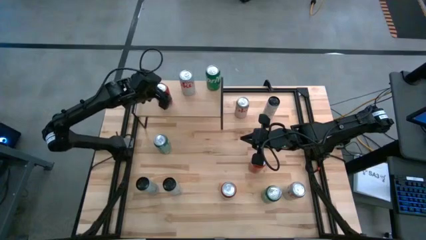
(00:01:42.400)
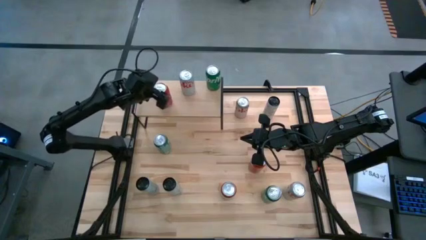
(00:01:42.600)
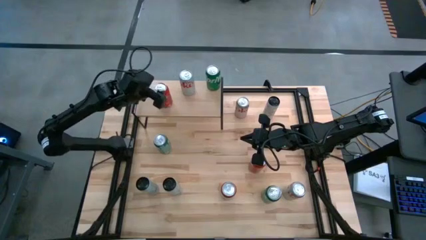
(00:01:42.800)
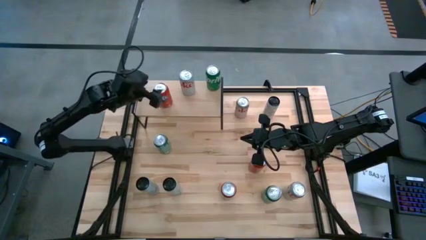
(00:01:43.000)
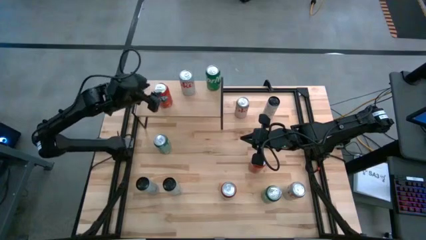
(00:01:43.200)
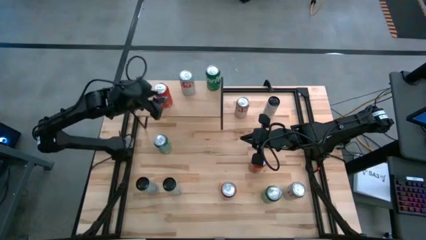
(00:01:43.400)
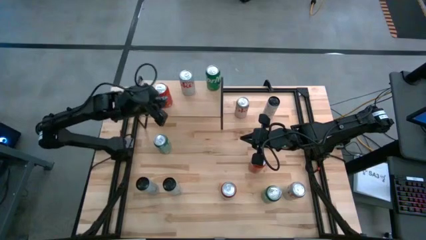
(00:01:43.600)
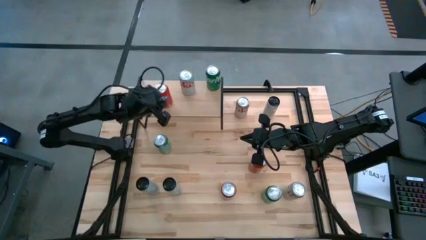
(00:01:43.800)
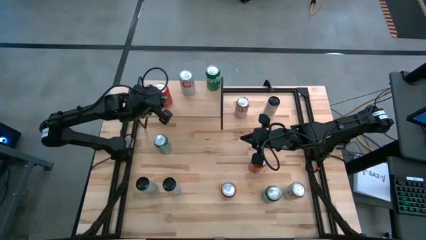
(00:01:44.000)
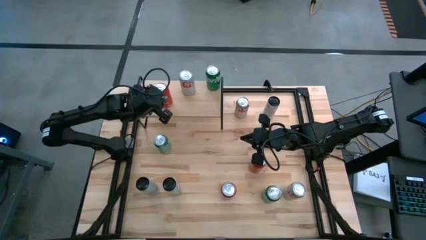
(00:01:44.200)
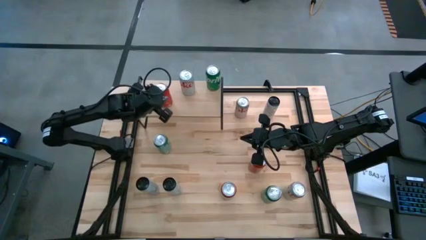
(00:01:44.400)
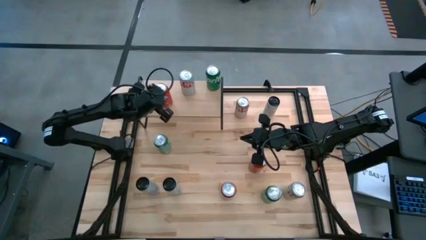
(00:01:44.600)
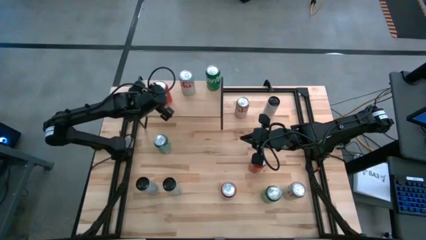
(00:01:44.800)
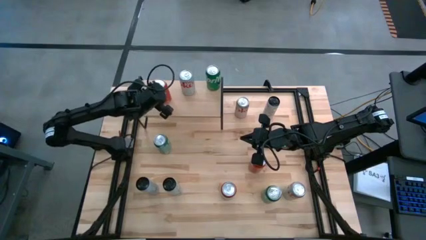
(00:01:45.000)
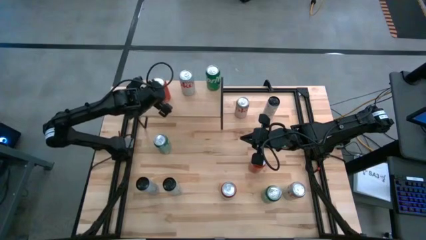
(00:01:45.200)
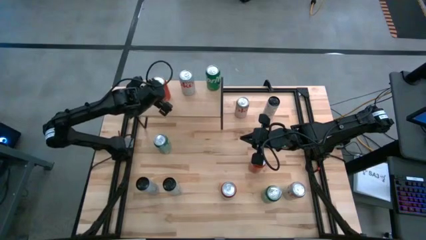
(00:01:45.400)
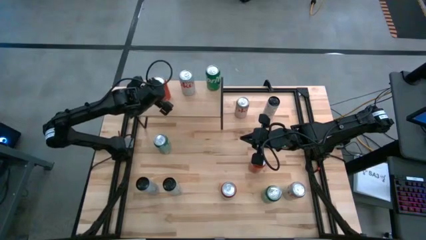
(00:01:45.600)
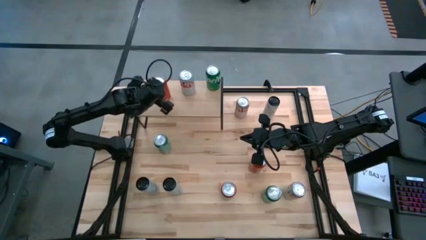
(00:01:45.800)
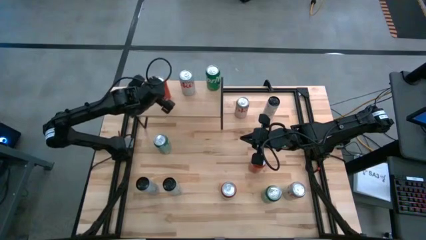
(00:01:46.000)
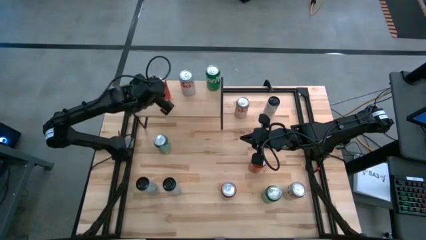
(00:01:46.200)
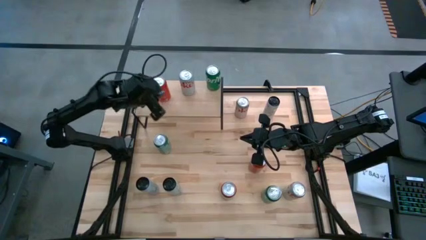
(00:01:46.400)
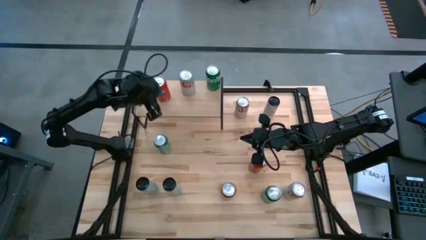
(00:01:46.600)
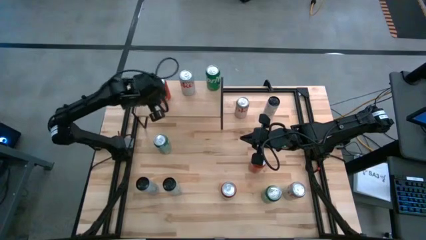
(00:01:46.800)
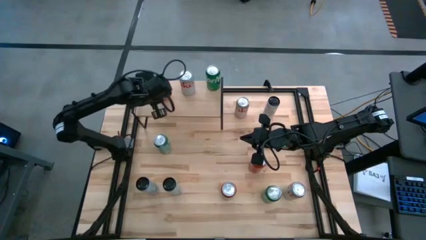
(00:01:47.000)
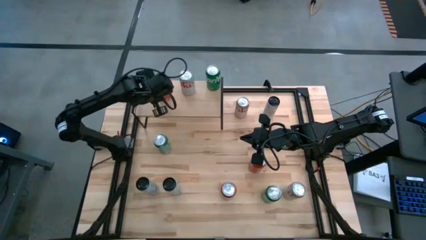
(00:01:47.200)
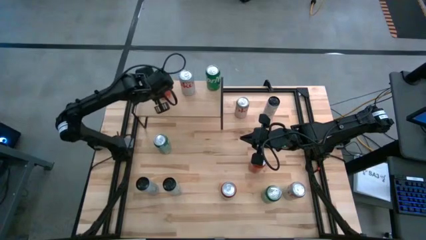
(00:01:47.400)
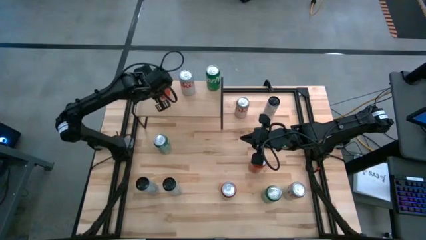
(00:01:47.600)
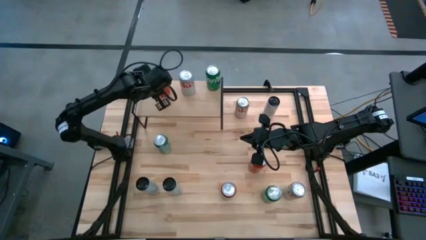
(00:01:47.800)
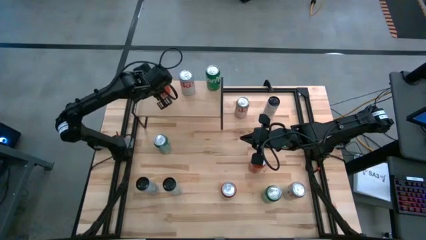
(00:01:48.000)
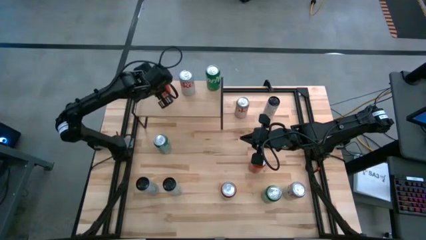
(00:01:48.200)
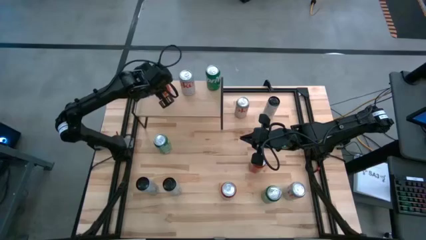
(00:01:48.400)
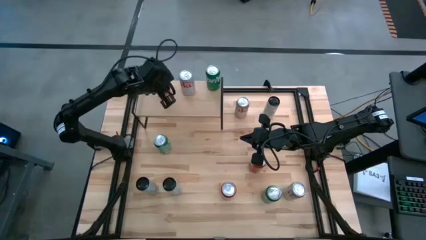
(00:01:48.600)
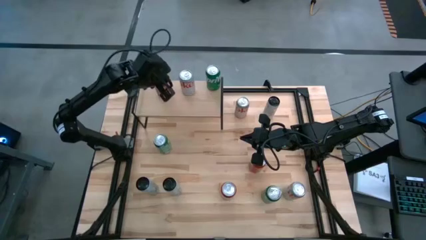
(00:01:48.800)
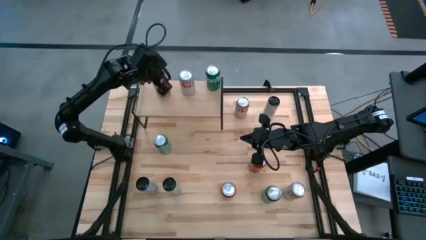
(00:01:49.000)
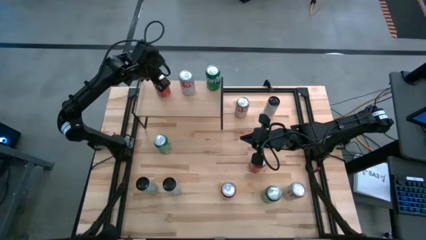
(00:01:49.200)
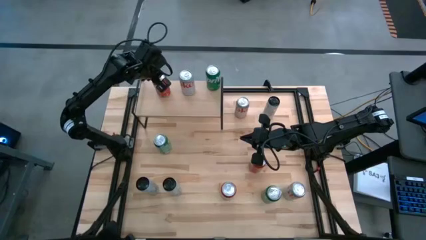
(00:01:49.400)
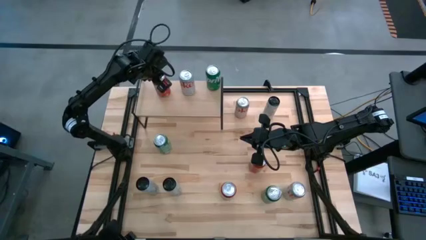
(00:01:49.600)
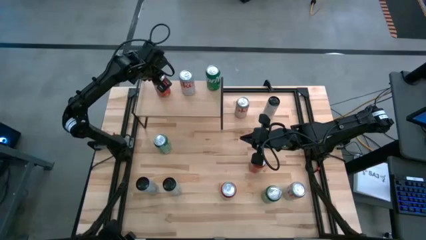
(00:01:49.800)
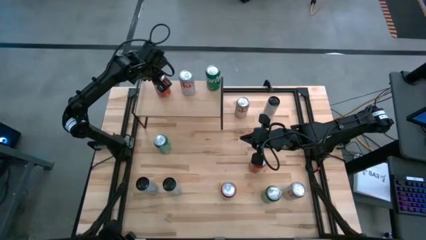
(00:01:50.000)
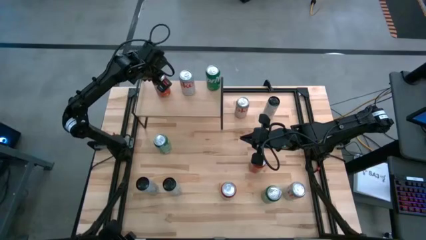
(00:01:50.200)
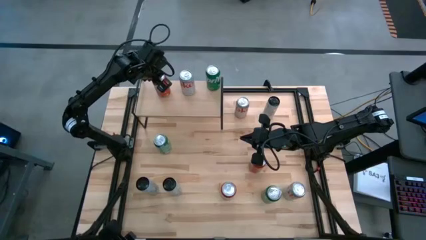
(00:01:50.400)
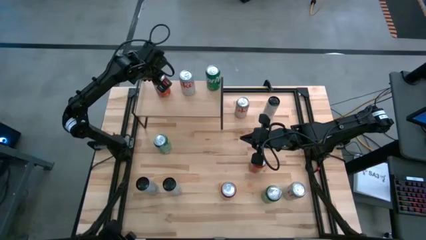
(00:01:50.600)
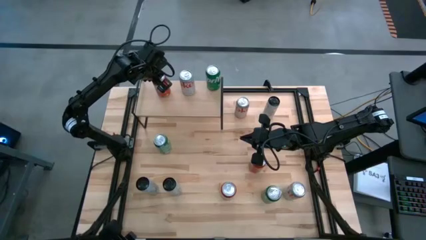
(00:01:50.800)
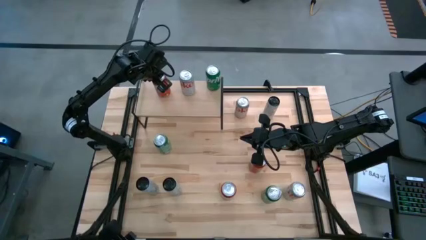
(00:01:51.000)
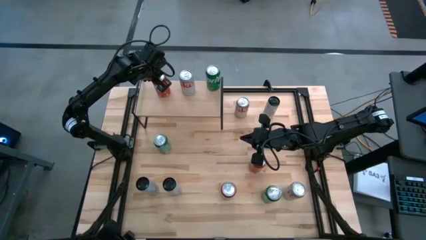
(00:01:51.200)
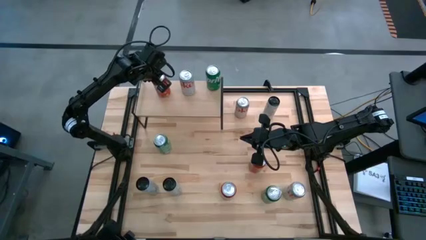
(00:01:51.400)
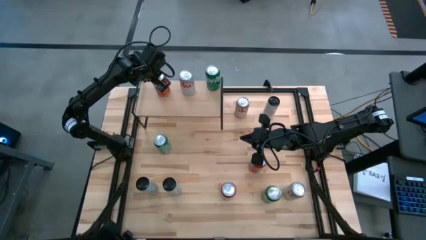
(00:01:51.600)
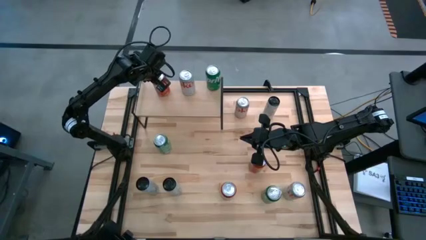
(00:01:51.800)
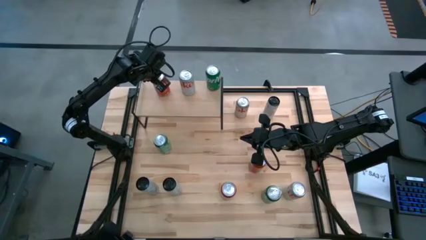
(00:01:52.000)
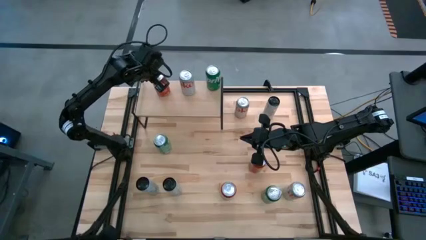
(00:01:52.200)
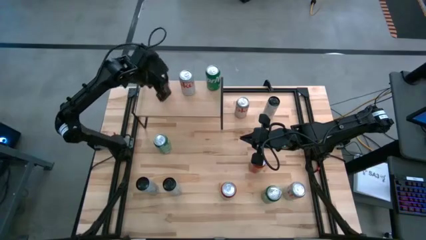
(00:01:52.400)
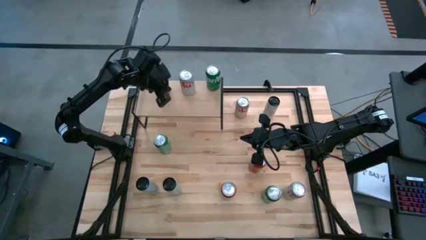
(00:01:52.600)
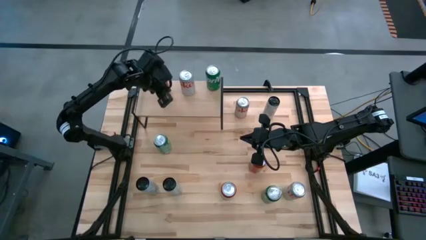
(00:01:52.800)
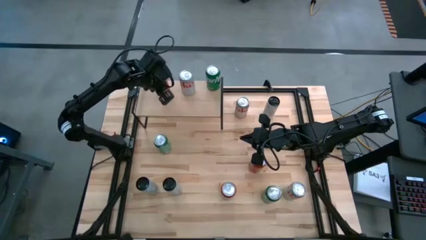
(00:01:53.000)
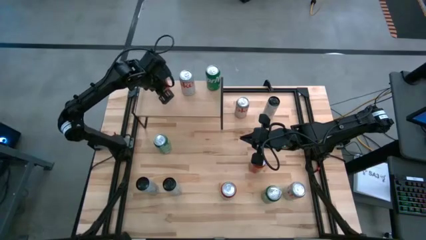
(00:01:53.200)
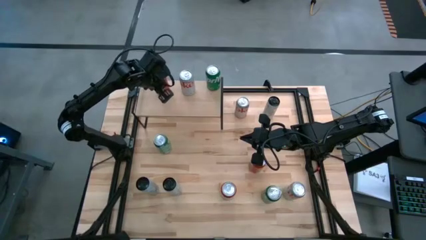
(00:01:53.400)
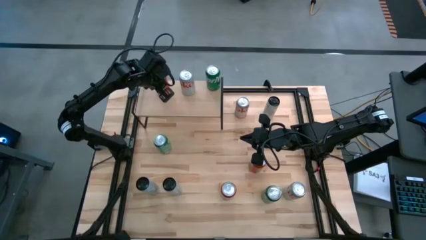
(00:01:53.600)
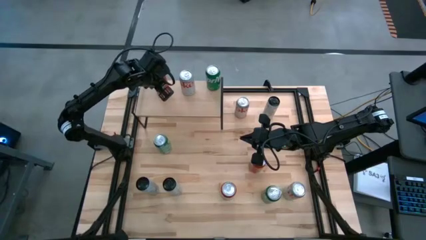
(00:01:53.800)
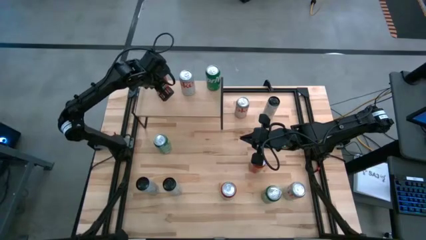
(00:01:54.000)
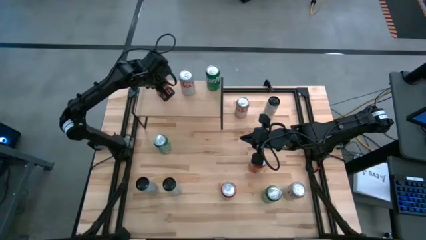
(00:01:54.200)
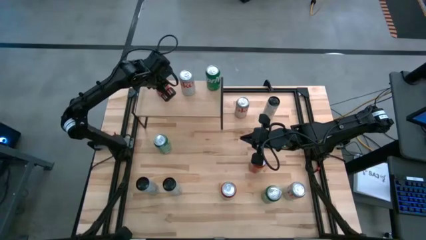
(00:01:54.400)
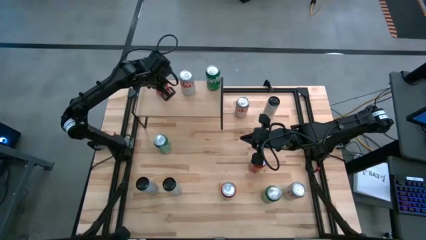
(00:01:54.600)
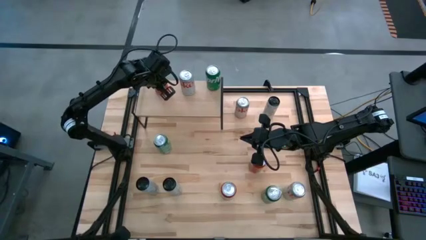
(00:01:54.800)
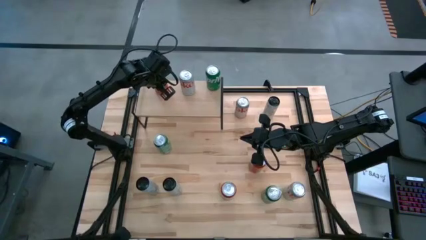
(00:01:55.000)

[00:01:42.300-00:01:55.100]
Task: Place canned beverage on shelf
Put the top left red soda can on the shelf

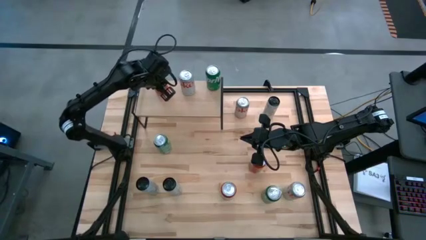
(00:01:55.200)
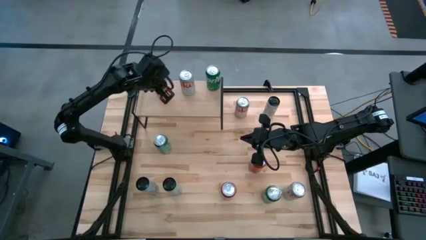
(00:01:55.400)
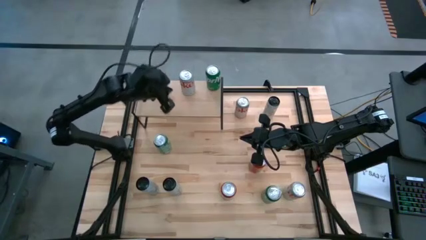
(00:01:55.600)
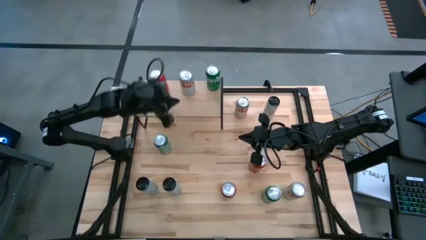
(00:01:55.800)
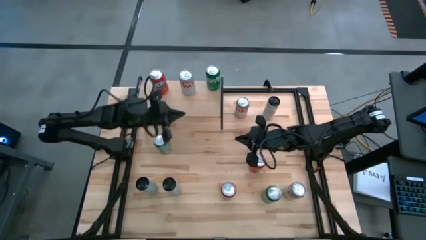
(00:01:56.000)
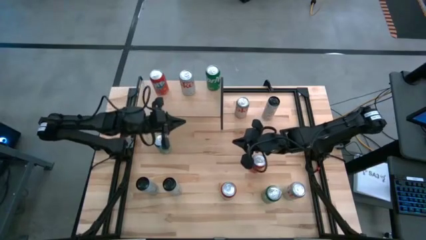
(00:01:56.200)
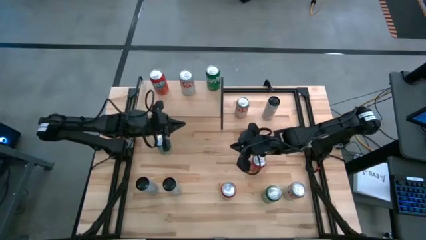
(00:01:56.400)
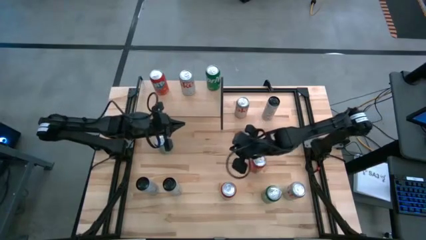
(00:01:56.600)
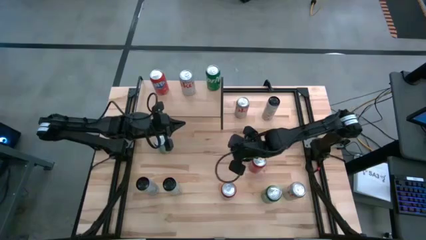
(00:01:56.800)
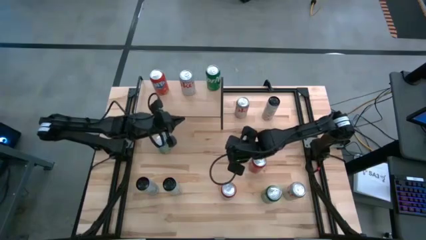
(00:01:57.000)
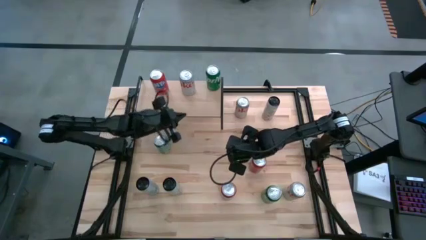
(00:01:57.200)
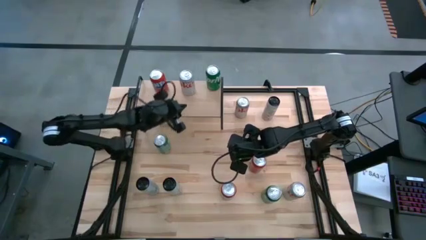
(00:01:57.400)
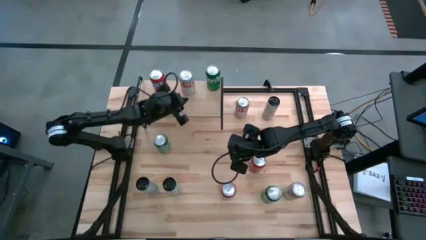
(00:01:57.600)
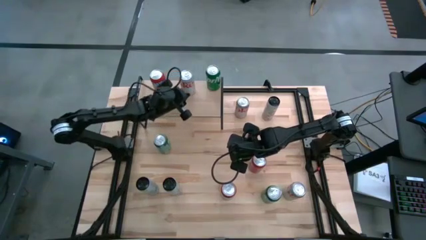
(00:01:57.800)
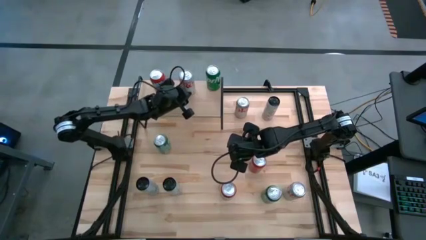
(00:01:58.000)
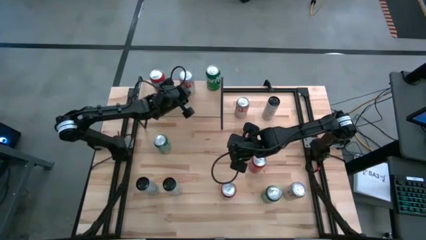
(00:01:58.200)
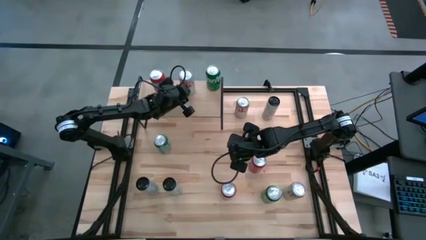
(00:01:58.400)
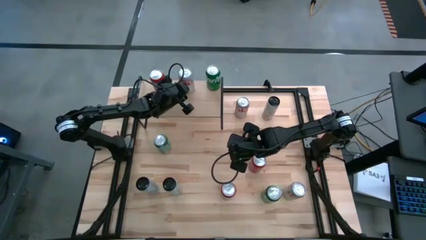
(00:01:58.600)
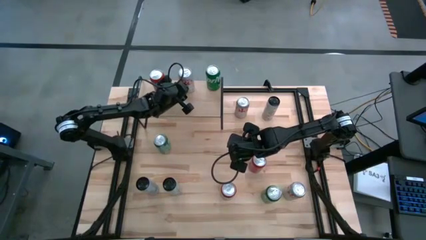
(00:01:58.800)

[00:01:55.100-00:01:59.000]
Adjust the silver soda can on the shelf
